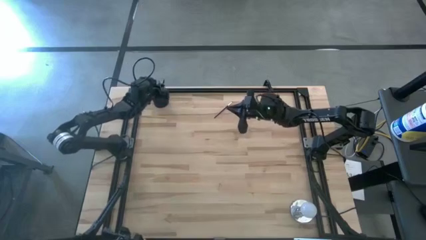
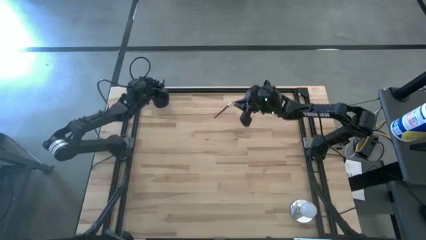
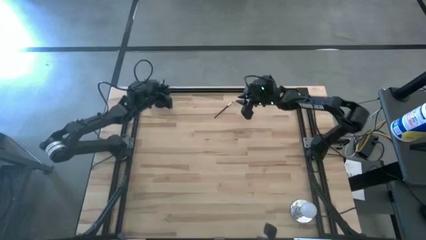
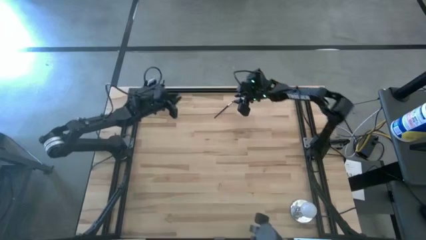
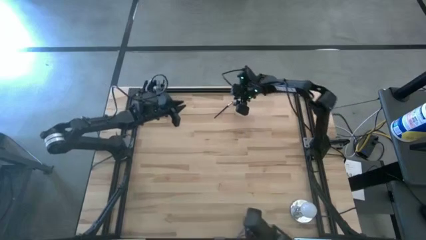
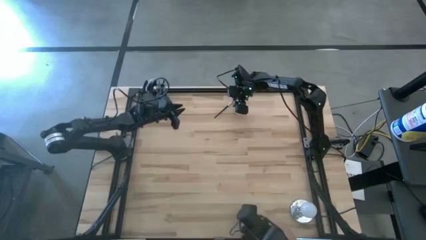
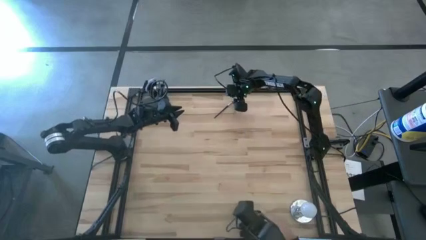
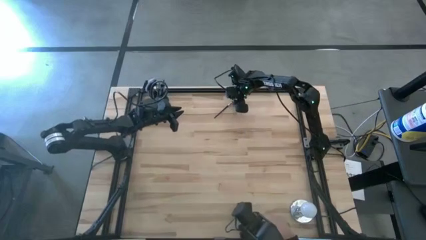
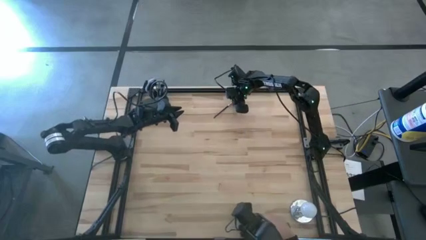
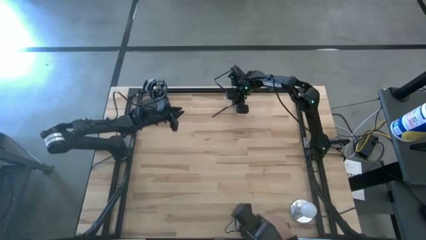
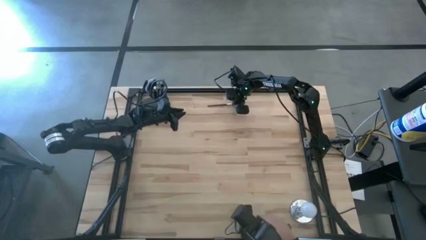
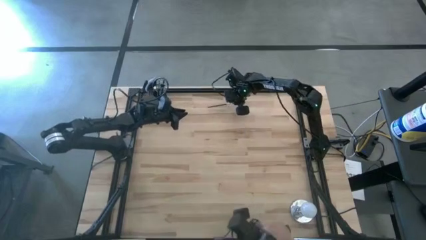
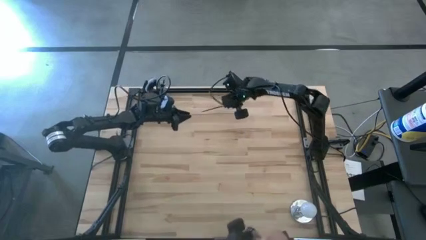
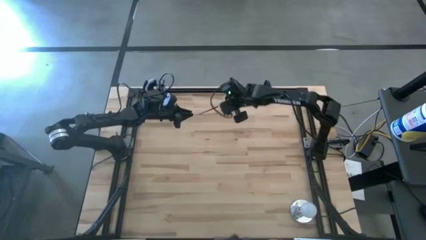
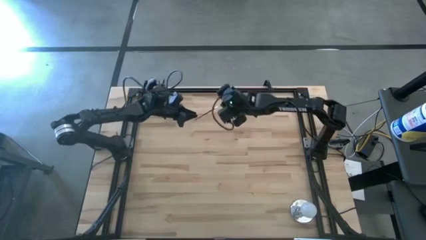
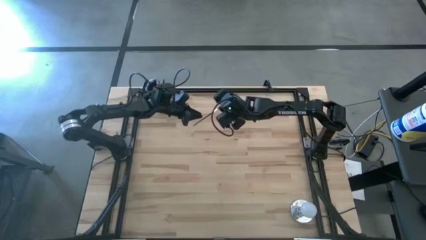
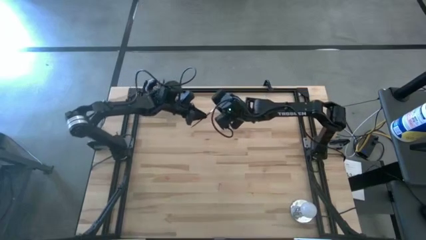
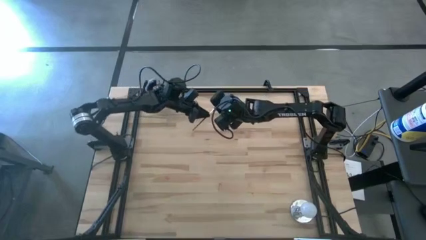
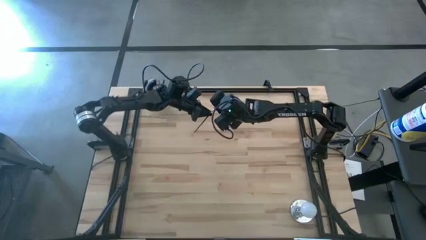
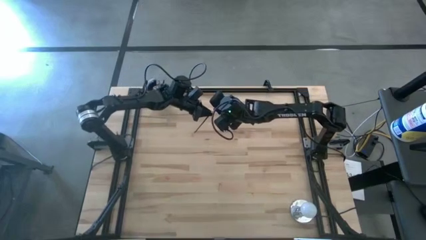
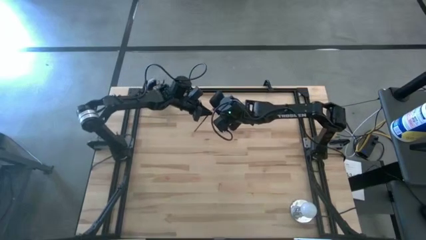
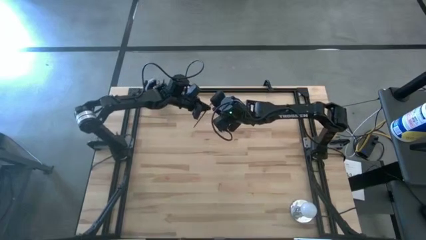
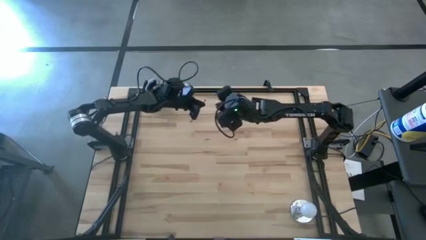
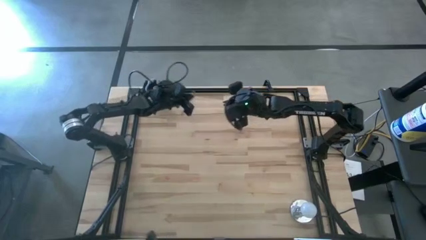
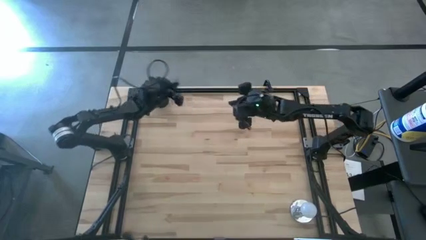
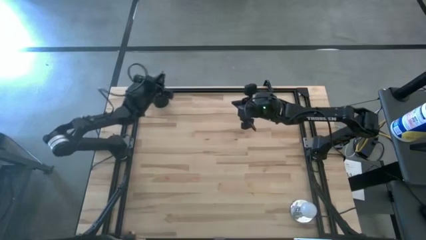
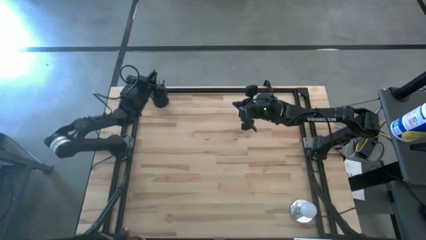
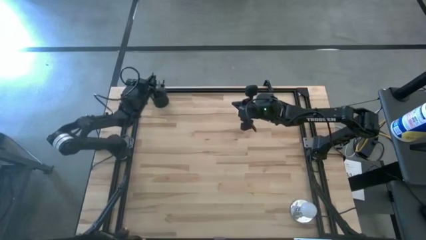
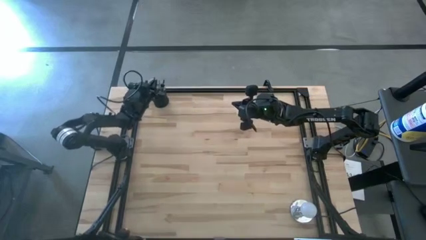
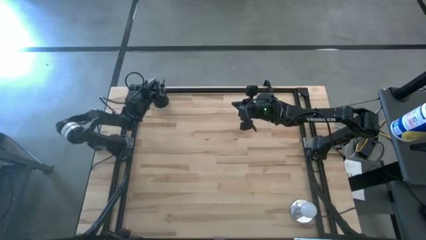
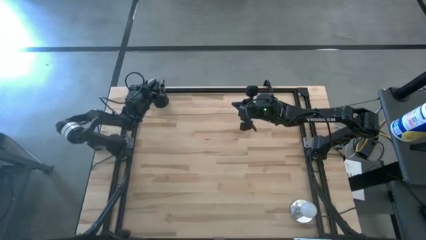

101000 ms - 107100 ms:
Task: Put items in baskets/containers
Put the eyeshadow brush into the holder

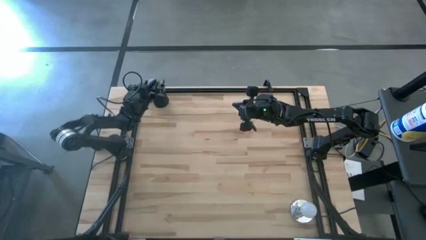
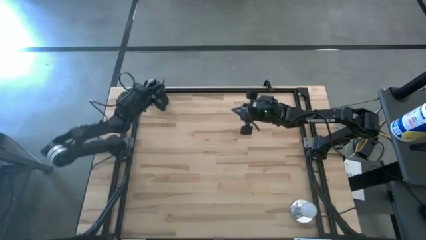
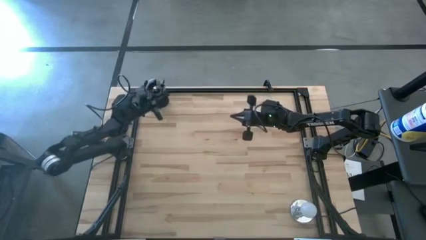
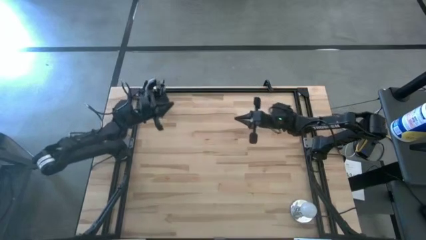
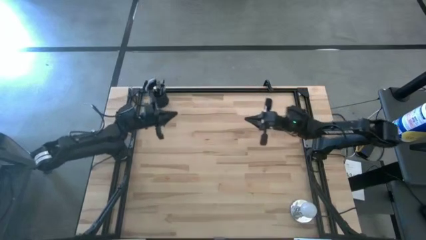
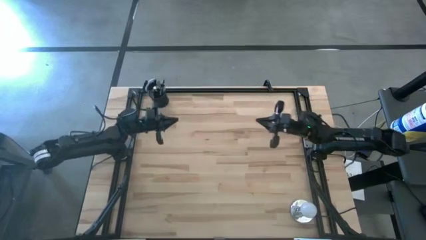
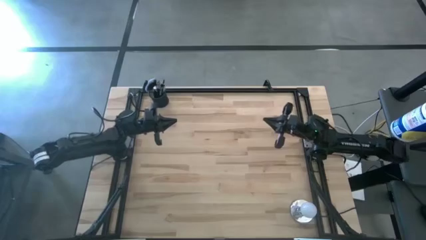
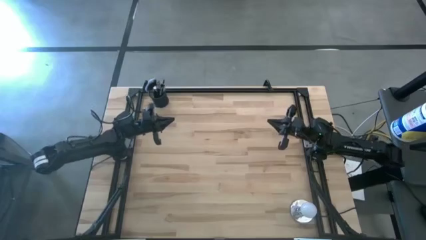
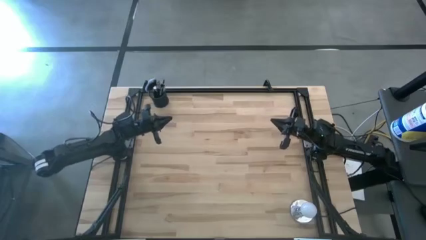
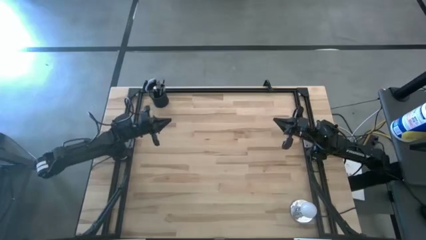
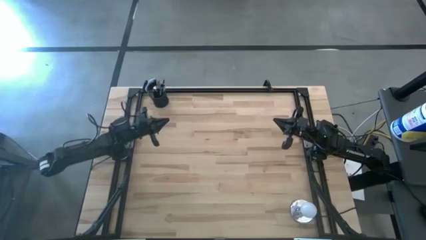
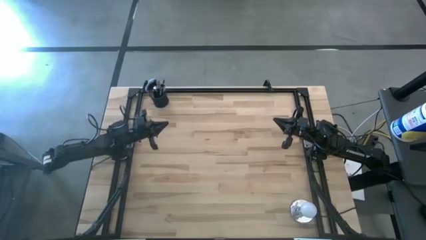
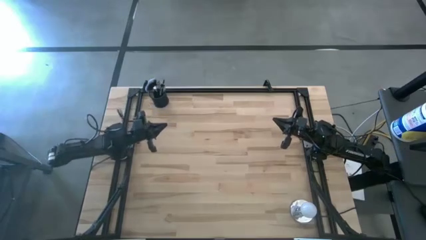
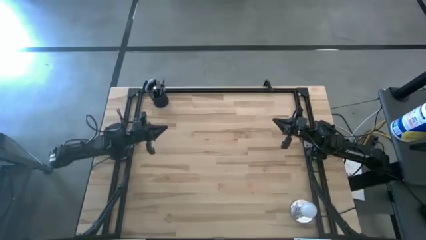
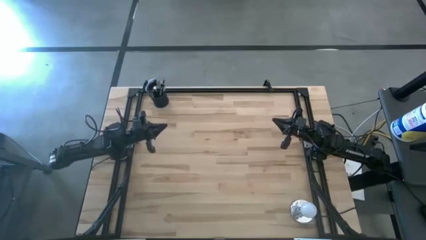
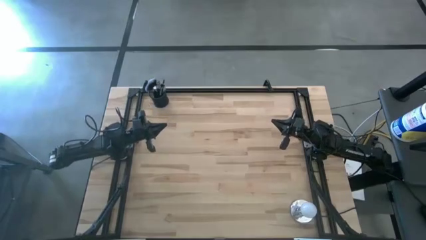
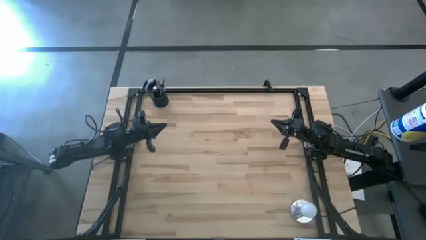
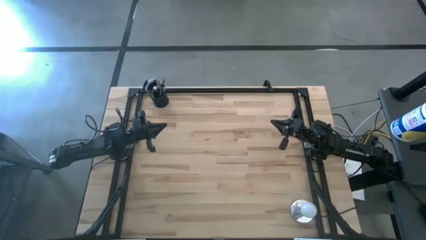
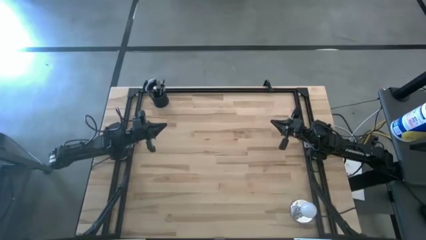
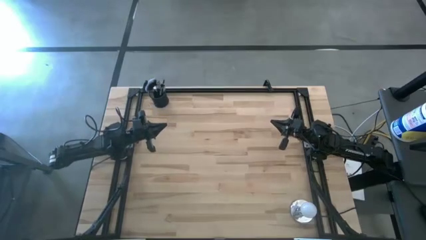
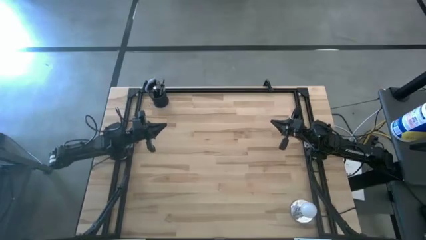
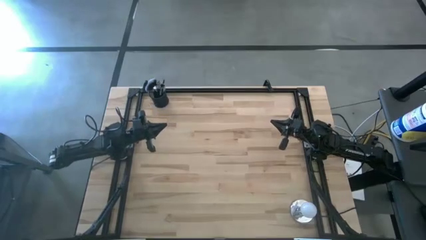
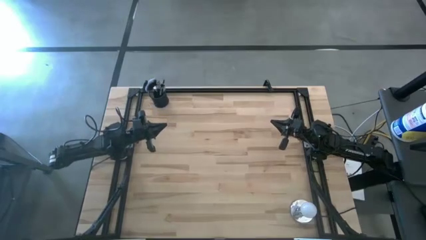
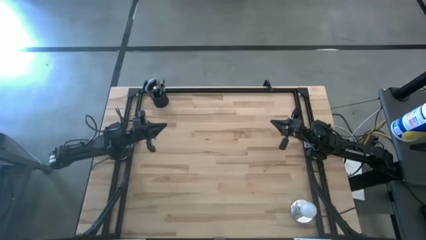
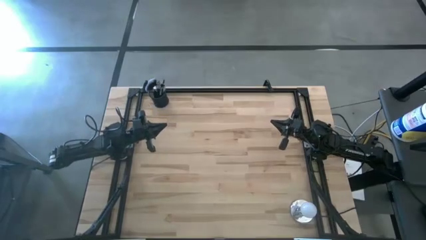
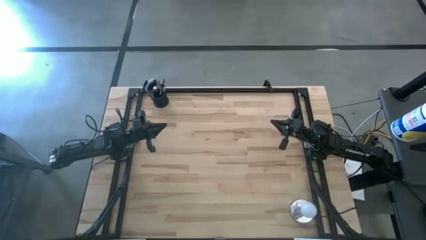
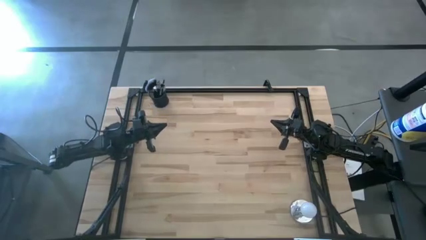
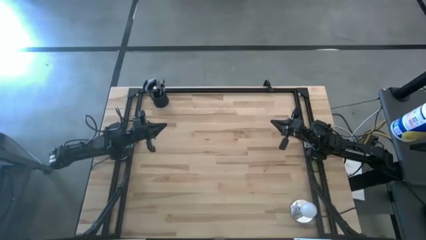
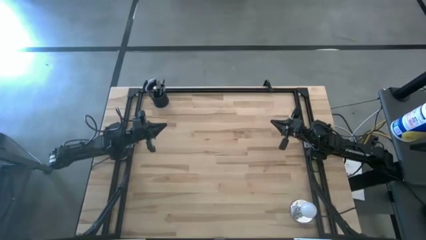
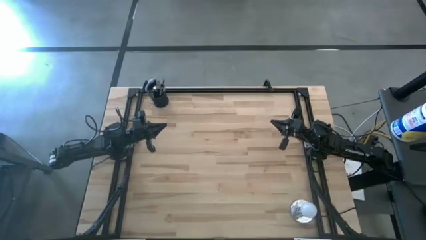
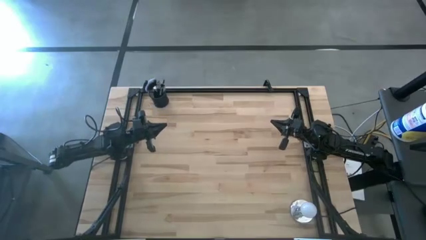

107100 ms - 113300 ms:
Return to Home Position
